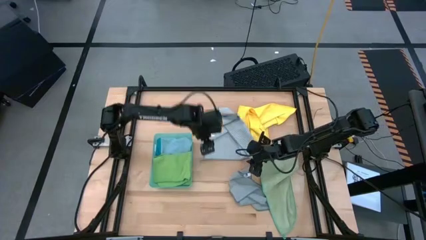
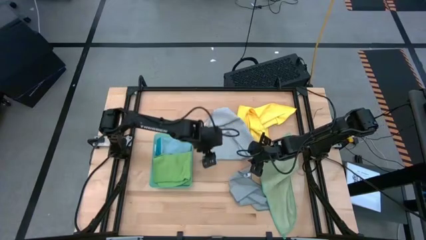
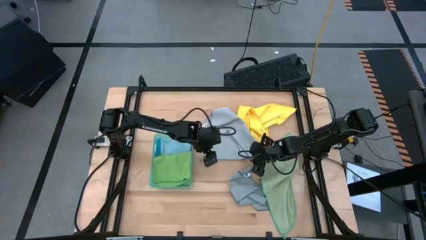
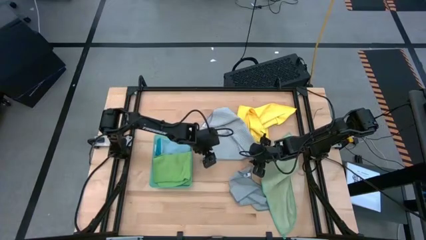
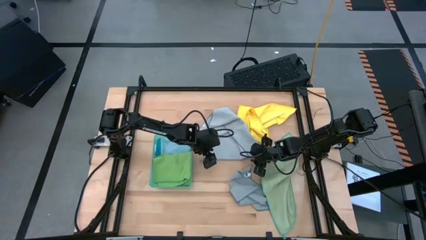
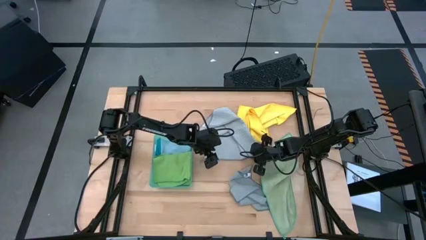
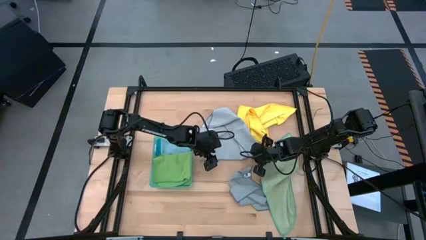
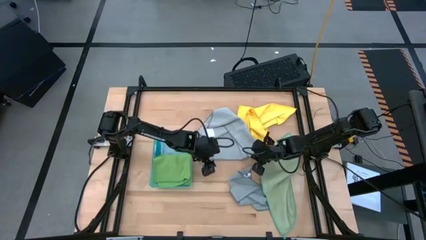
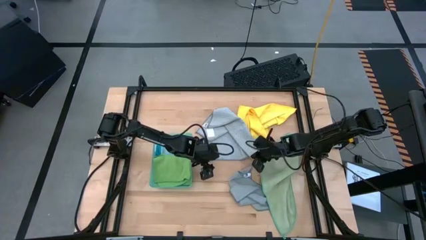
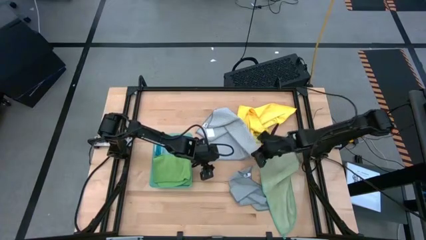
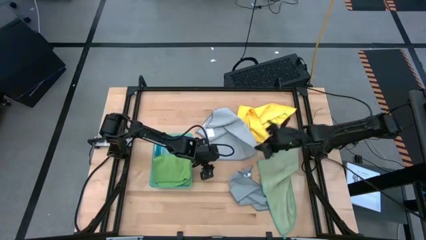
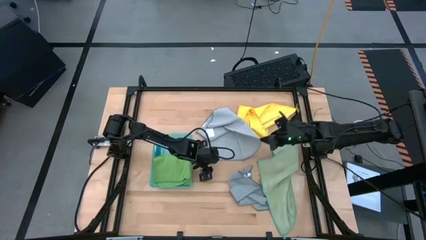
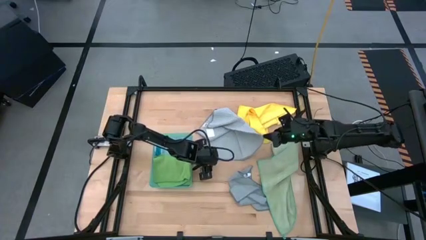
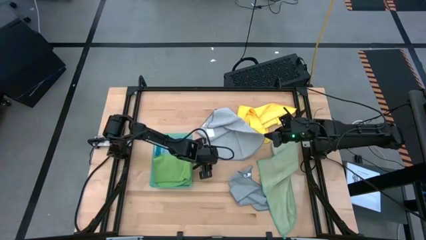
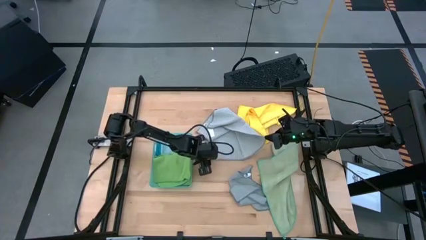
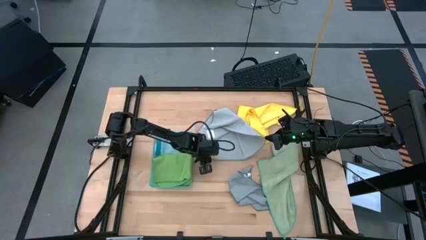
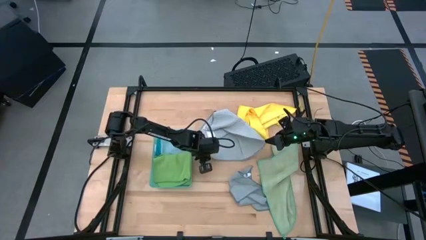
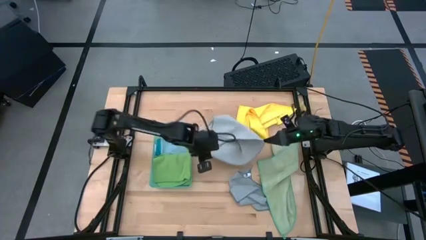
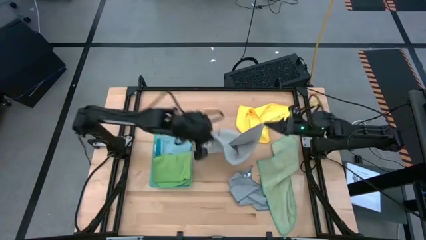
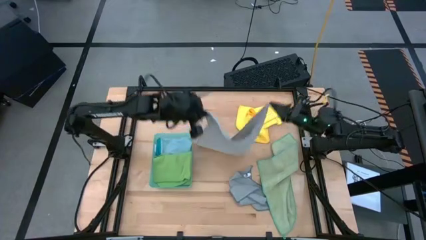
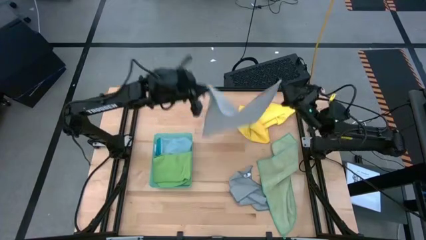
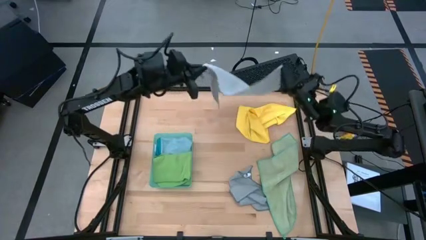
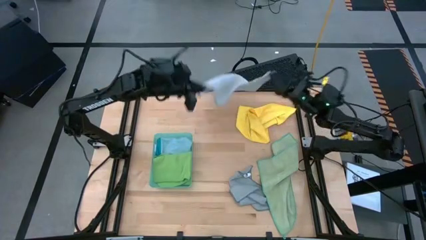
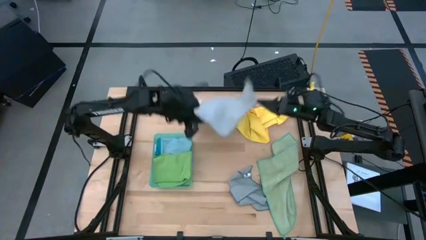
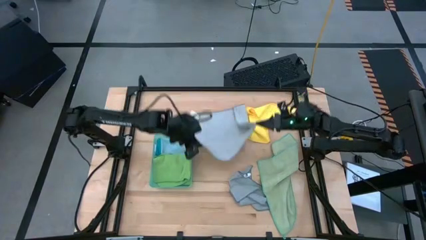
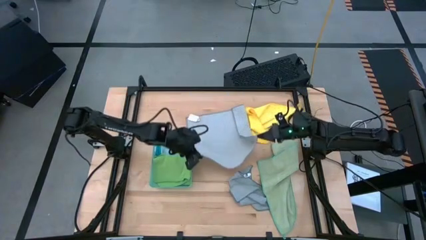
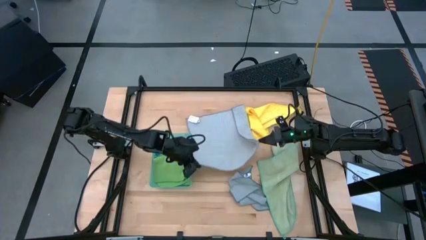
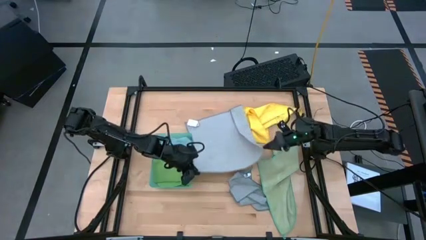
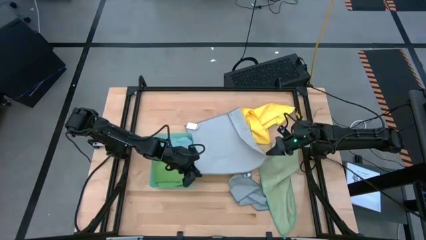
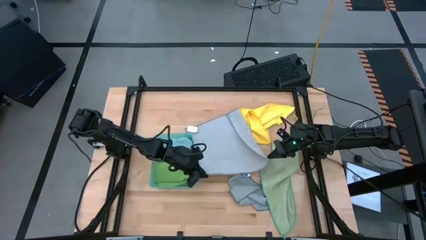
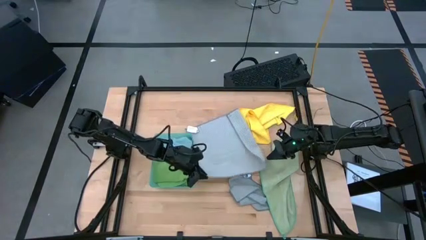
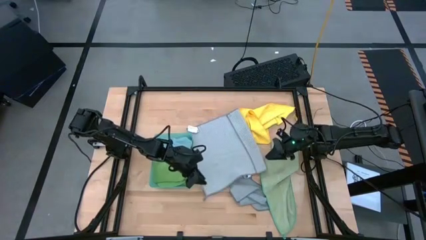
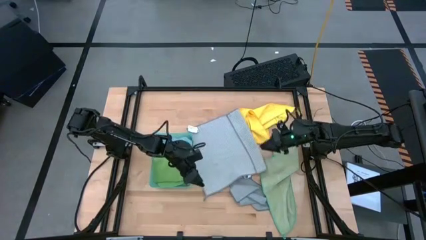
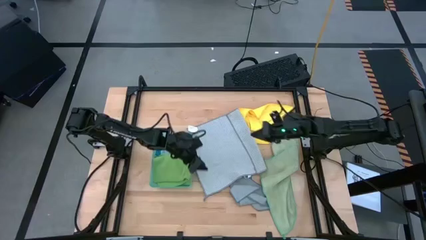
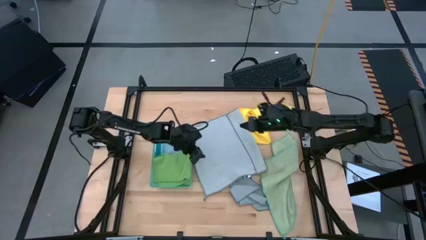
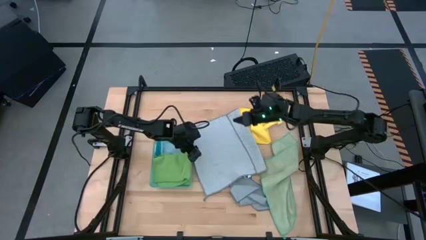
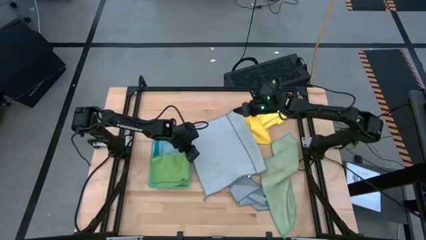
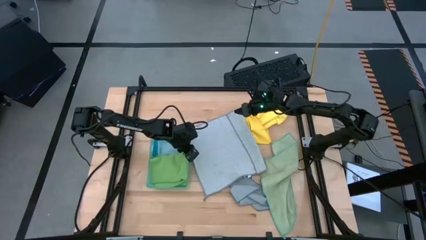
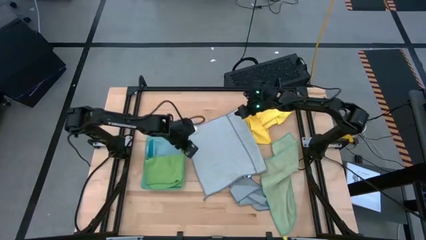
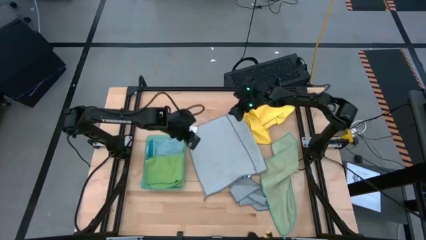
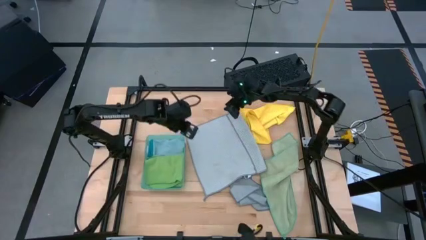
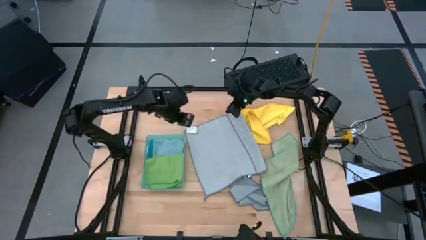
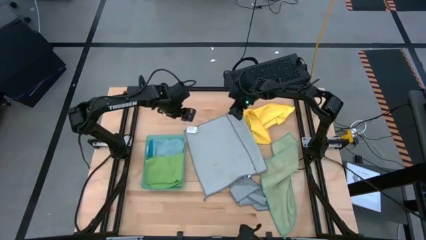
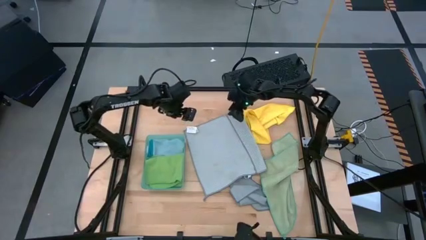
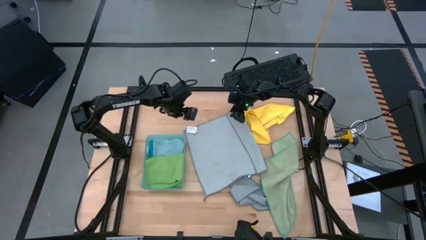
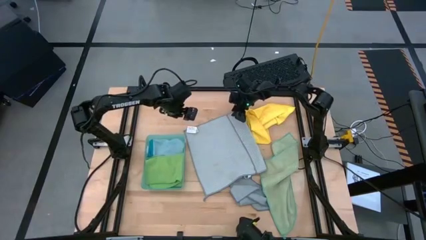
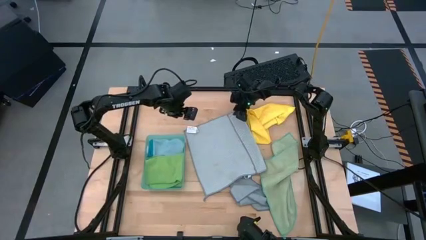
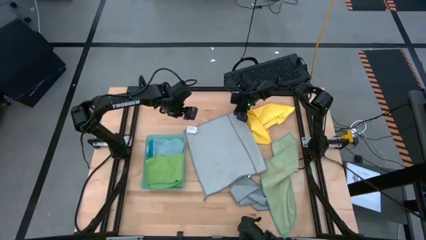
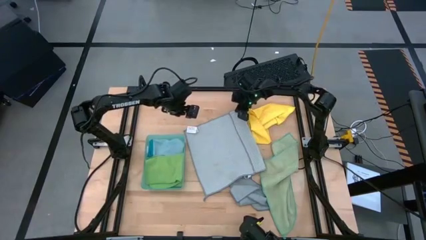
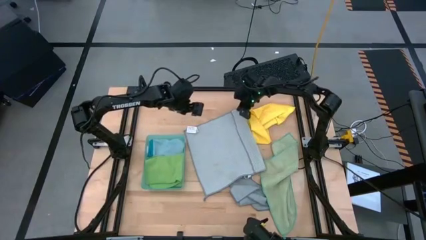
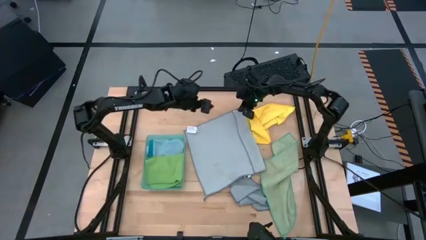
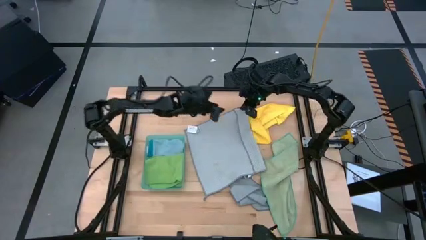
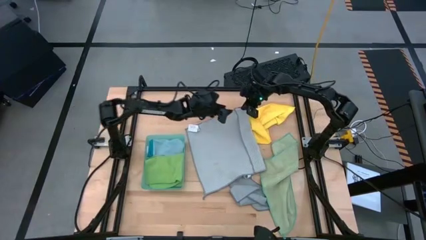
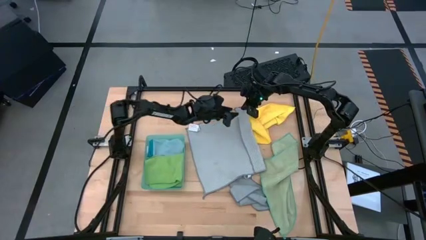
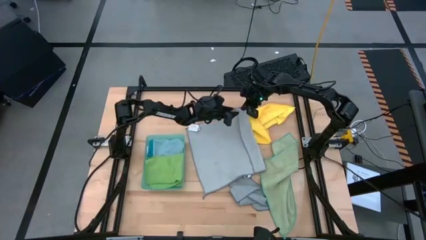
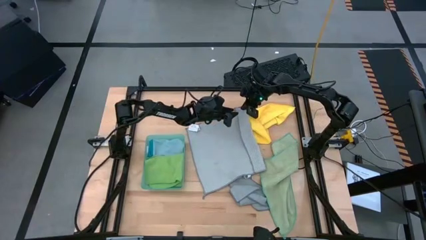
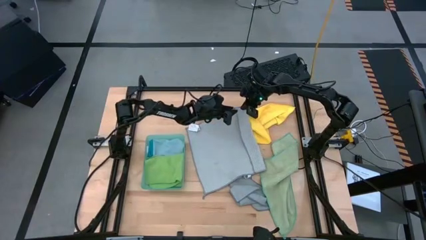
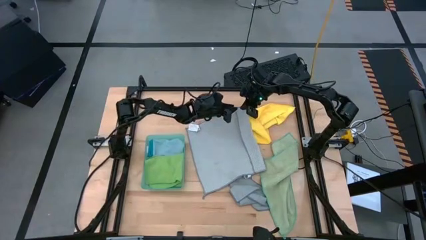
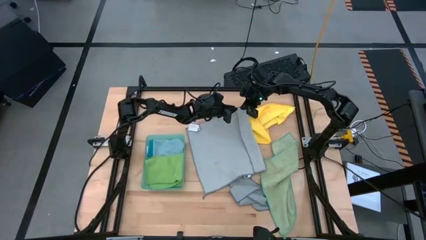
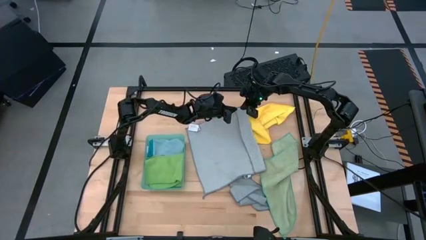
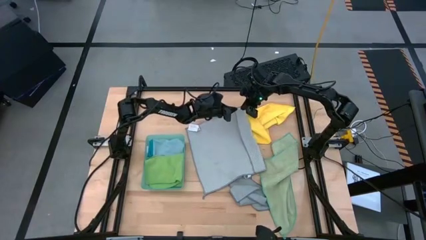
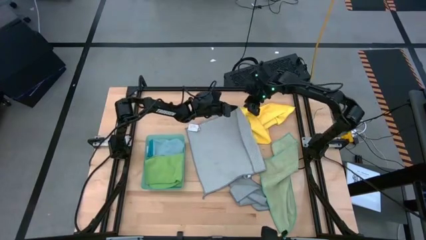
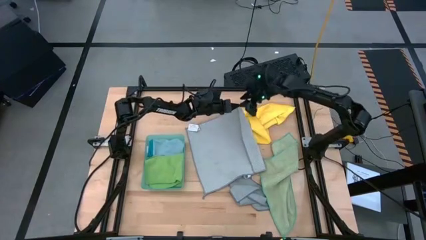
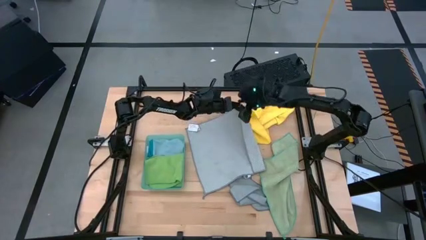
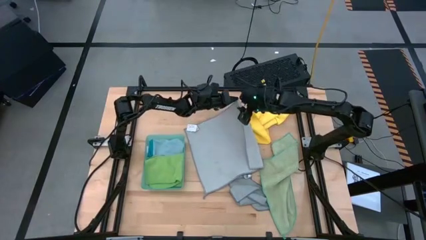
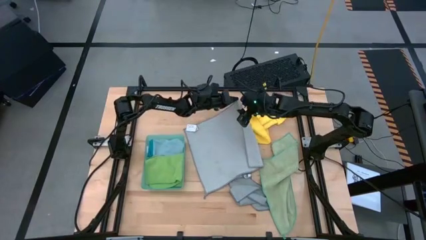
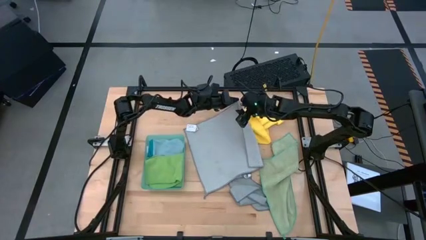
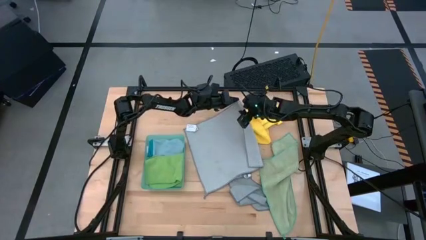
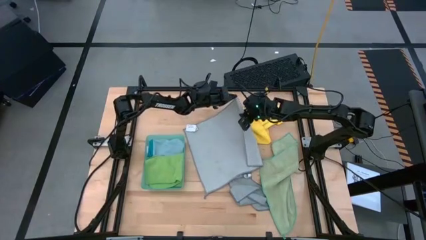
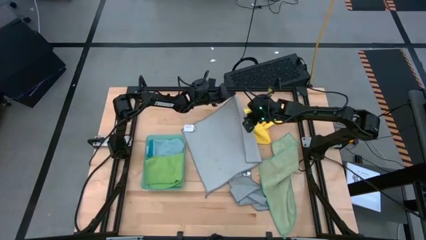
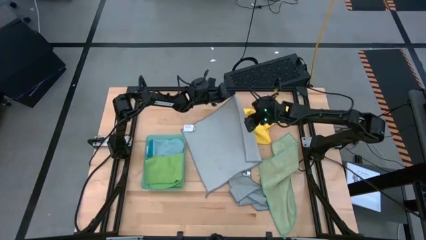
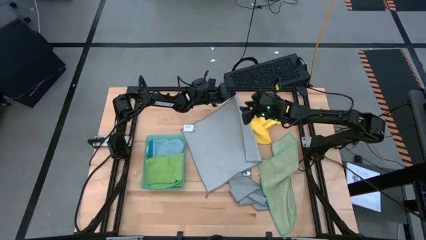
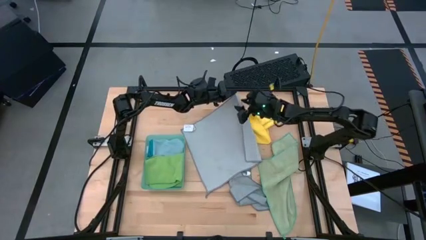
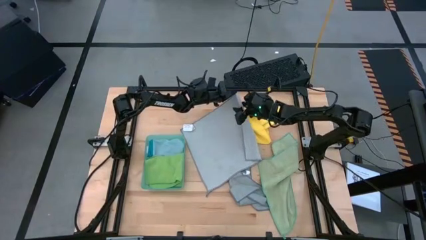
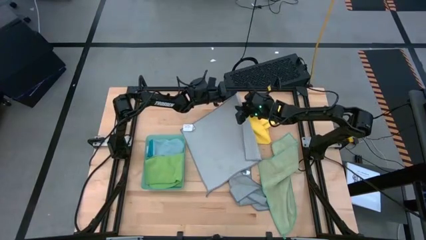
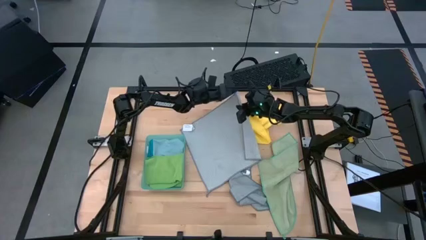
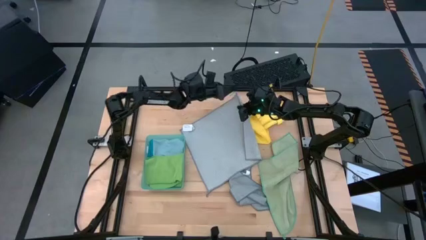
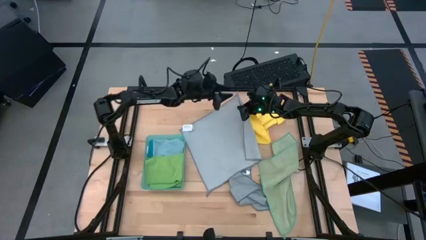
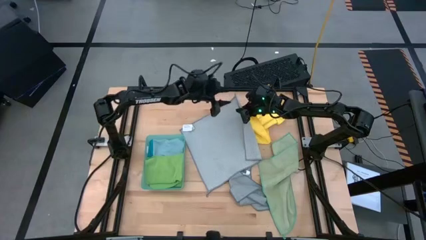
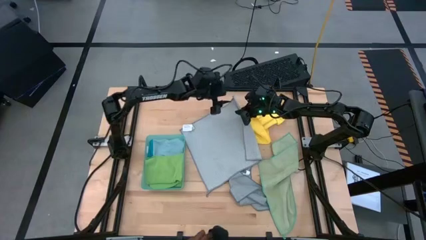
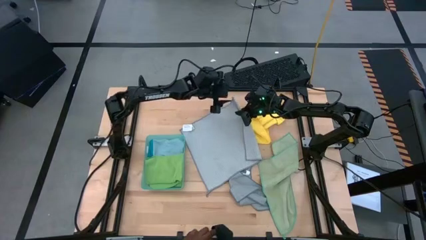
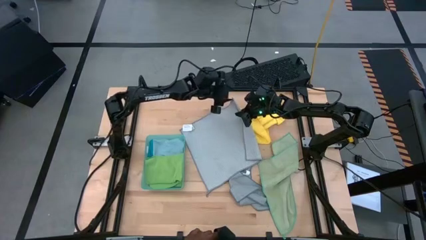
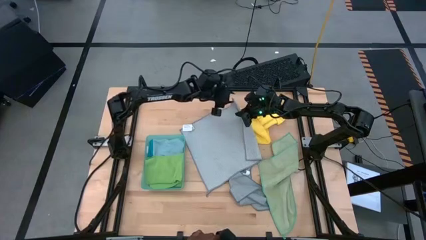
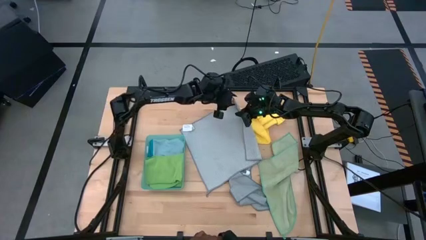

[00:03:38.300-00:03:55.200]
Task: Fold microfiber towels
Fold the top gray microfiber cloth

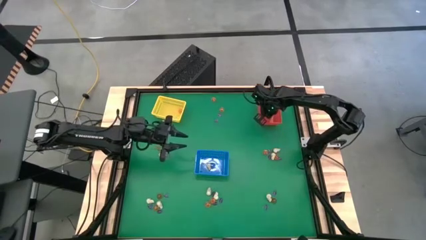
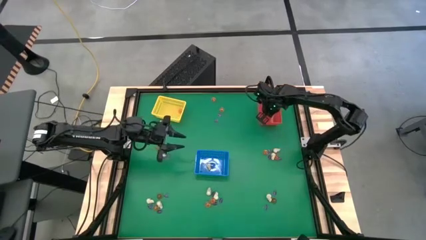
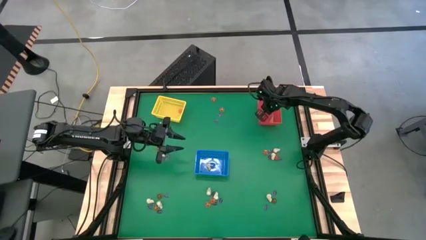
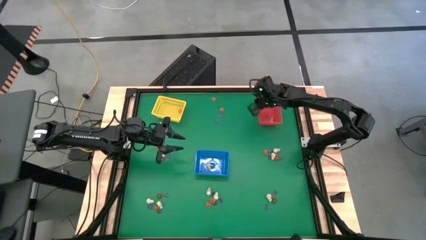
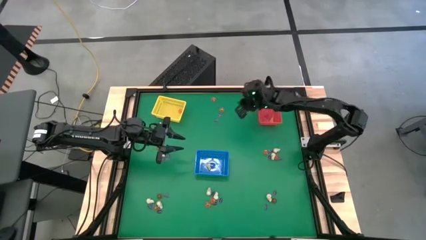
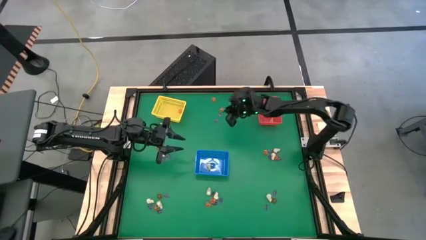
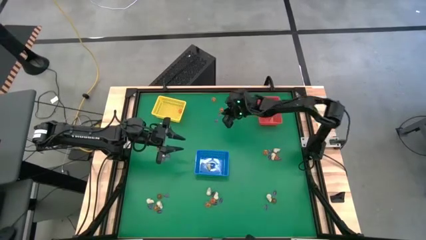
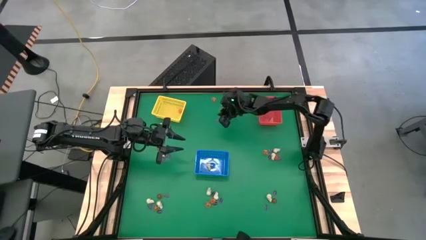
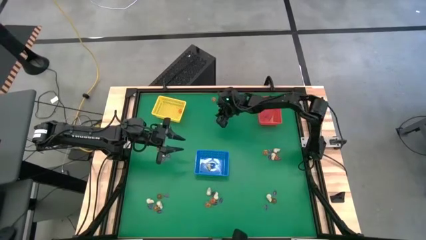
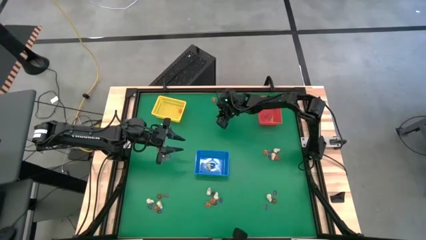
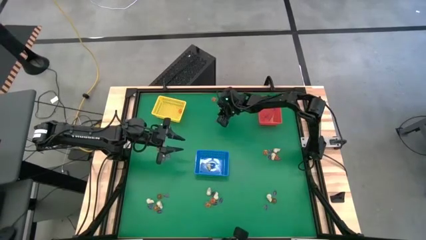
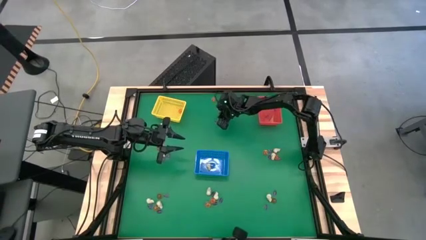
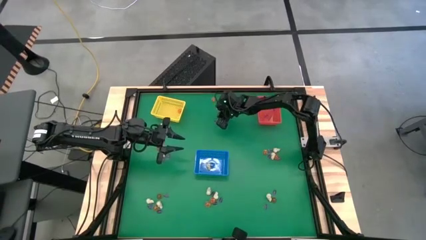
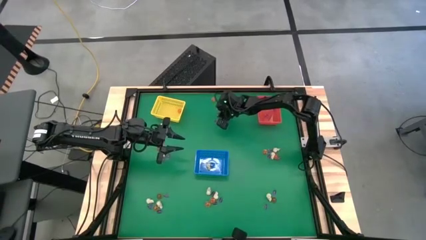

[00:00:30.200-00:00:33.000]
Task: Sort Halloween decoration
Put the purple witch hat toy into the red bin
